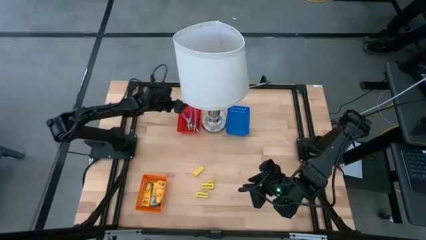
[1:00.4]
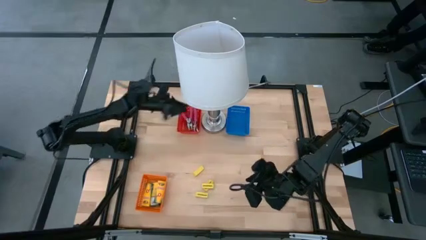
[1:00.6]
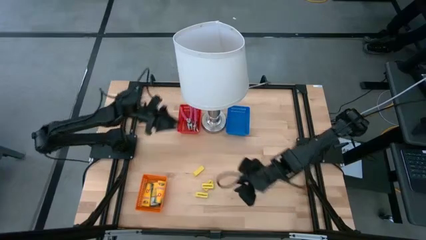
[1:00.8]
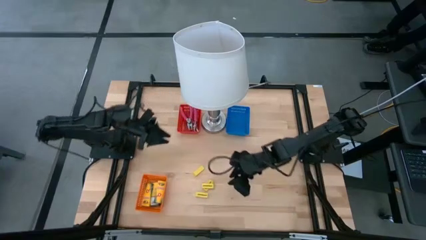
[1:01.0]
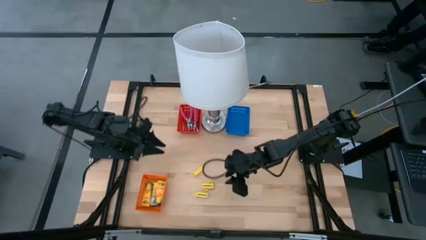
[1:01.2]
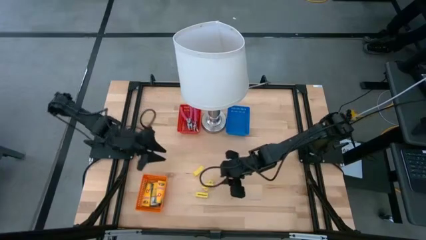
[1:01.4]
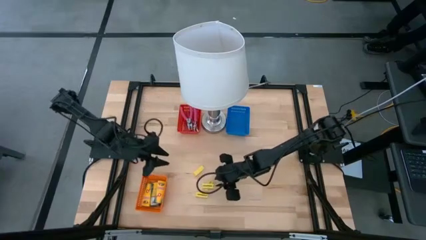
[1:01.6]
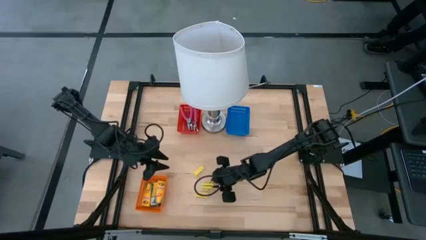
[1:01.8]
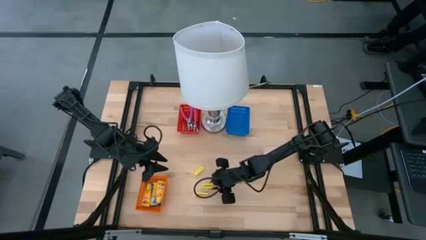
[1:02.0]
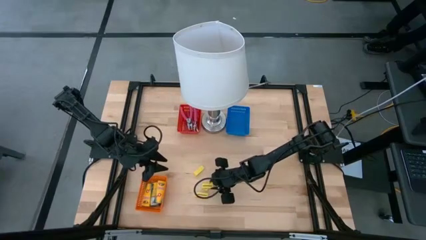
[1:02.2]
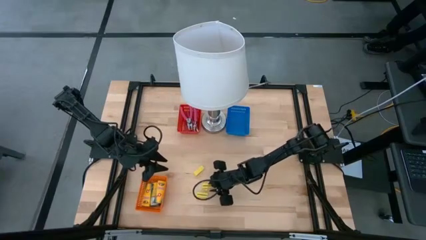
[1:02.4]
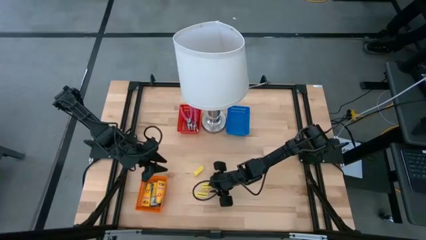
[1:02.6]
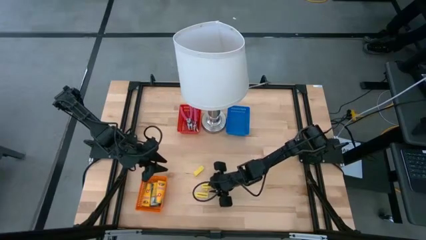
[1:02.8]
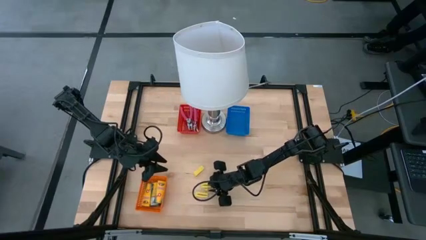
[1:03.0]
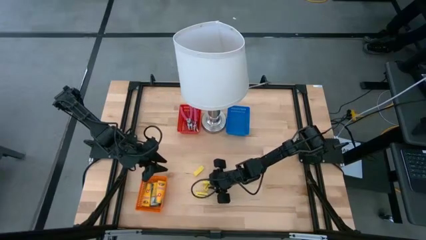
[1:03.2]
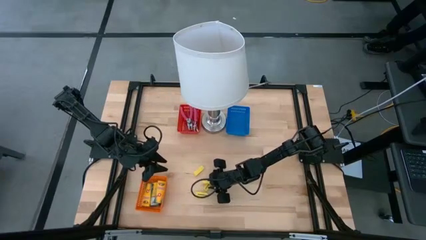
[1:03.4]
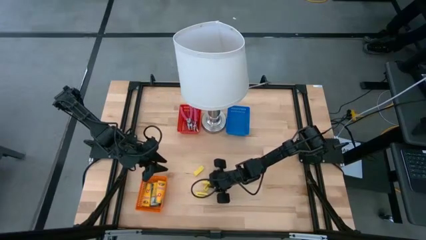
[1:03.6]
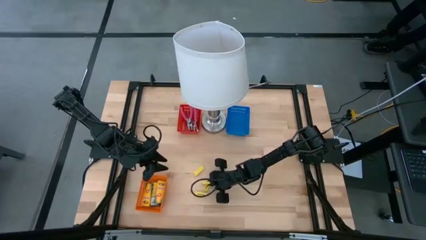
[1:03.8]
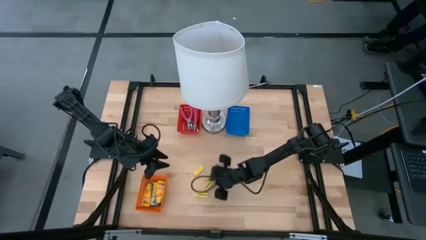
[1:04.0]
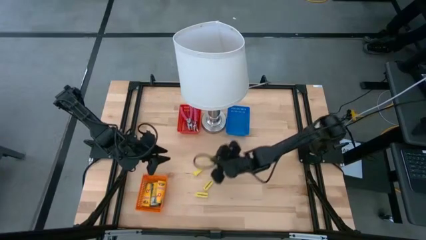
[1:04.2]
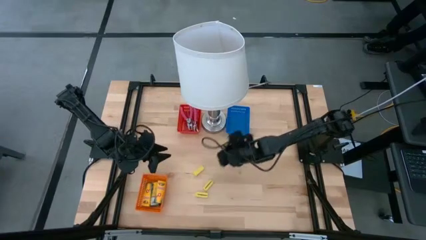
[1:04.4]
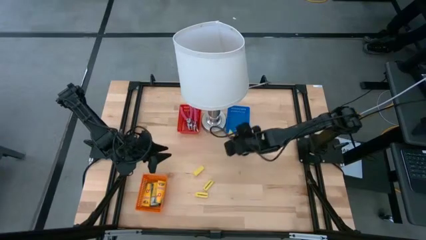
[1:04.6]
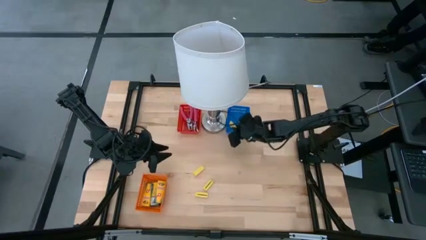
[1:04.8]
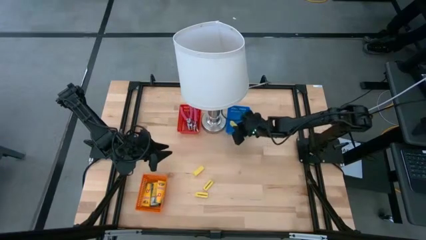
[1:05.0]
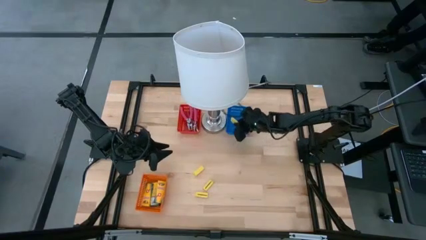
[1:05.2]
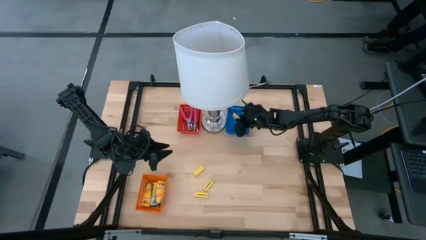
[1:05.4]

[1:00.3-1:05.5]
Task: Pick & Place School Supplies
Put the yellow eraser into the blue basket

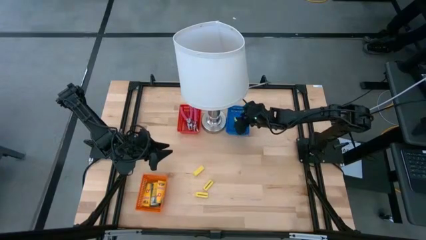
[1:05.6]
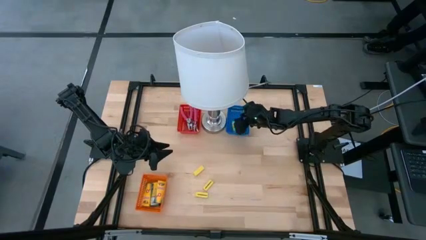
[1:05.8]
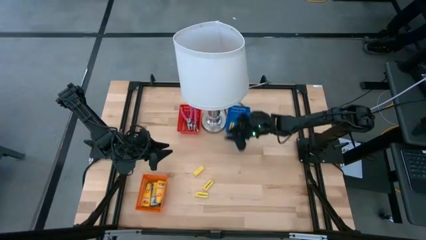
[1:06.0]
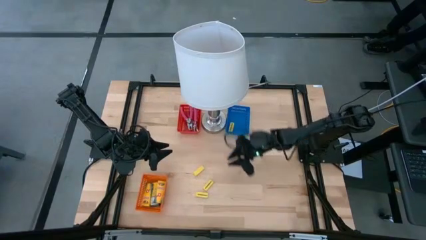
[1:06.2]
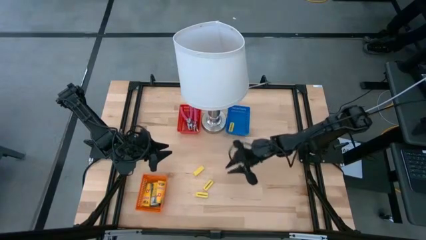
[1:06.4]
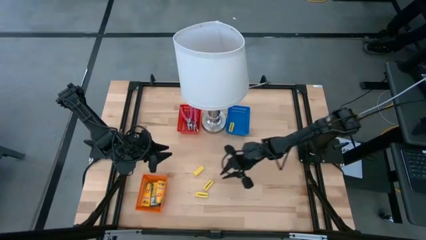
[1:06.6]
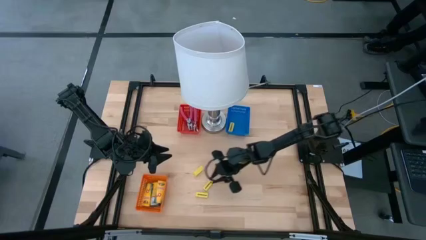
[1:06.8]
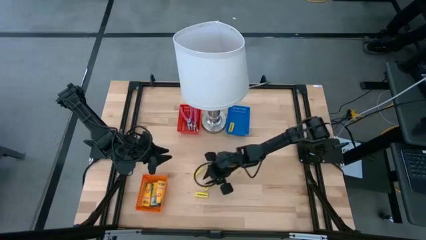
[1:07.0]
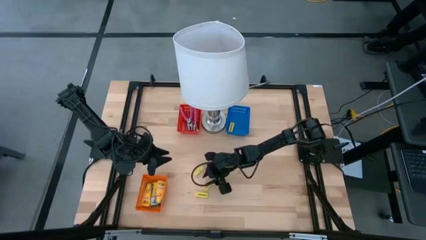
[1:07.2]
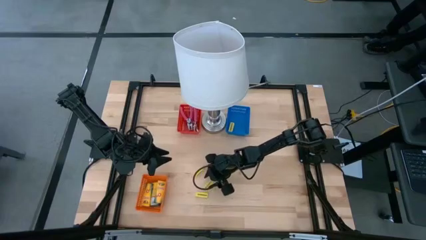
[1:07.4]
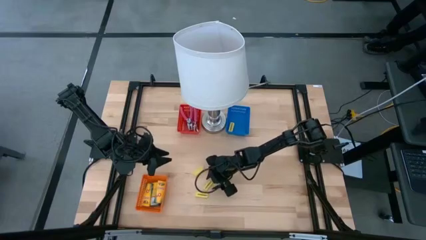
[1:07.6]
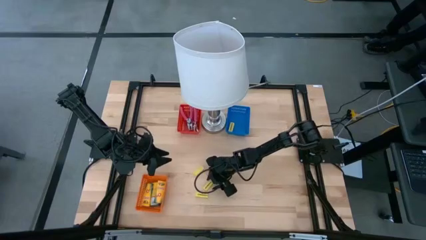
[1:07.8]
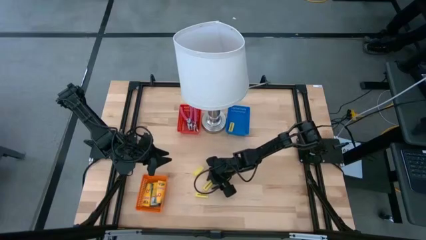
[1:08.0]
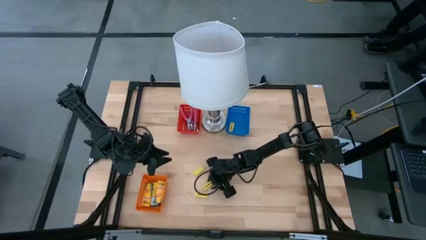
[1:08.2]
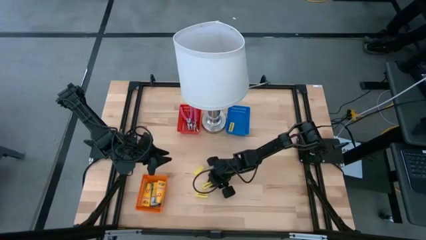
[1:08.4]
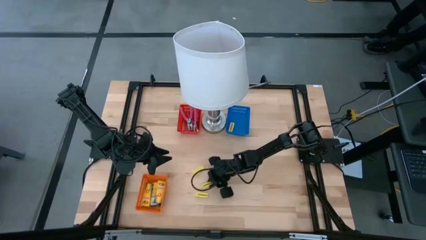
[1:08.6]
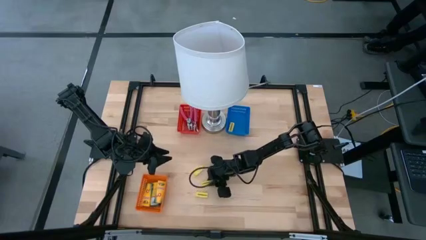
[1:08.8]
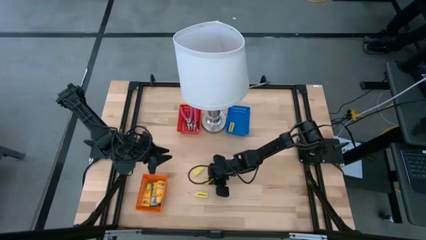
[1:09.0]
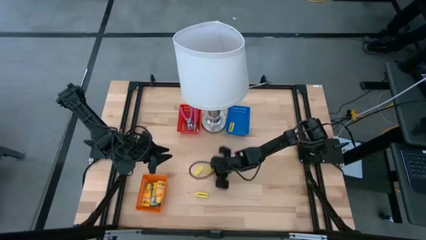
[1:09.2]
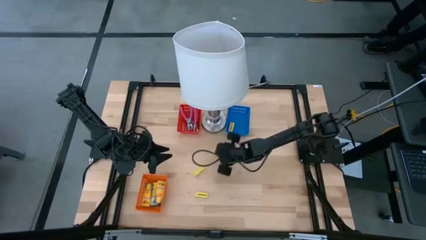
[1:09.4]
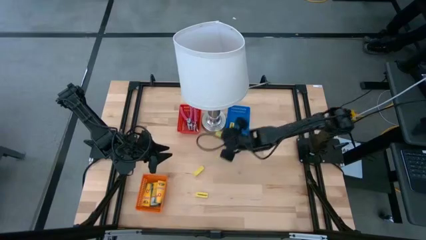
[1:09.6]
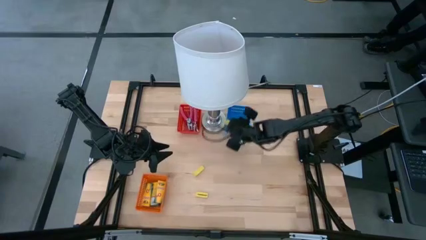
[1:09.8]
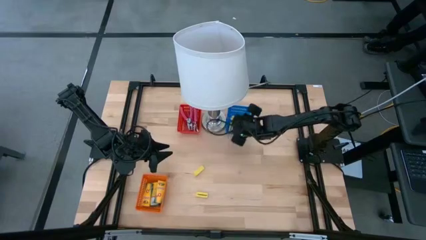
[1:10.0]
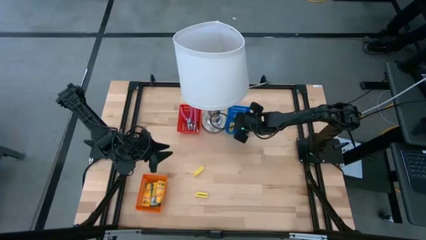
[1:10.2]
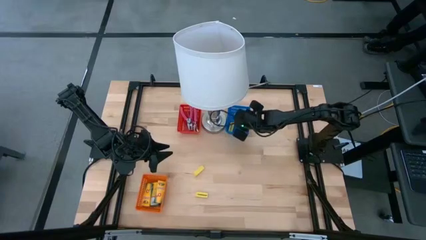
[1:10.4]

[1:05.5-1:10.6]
Put the yellow eraser into the blue basket

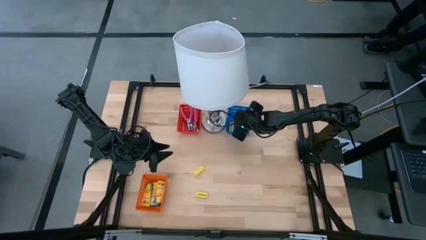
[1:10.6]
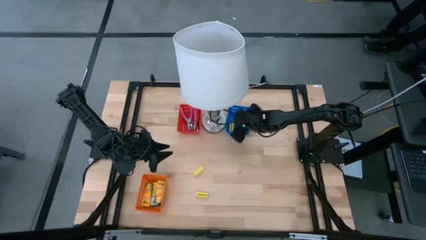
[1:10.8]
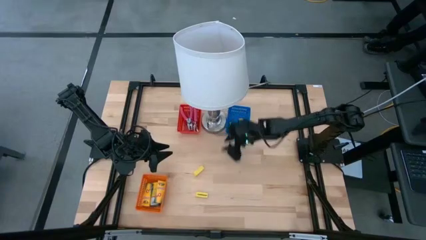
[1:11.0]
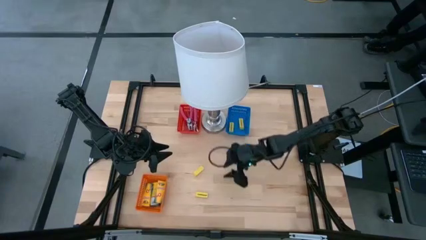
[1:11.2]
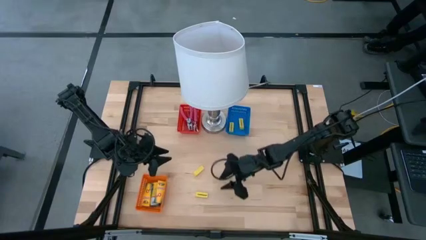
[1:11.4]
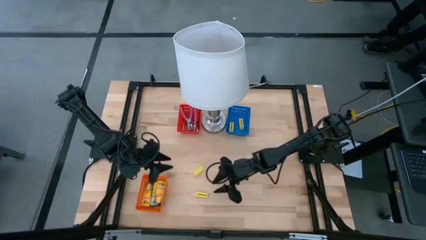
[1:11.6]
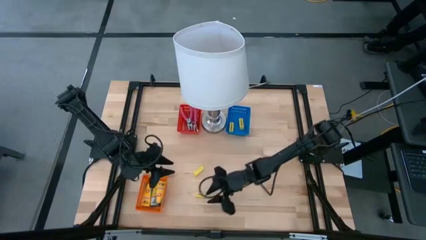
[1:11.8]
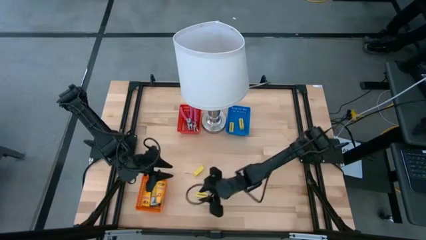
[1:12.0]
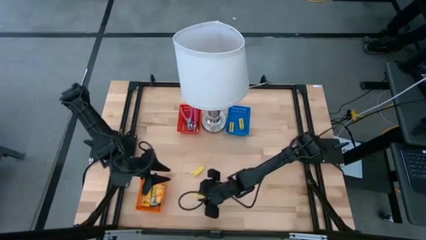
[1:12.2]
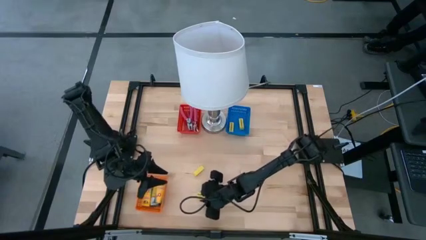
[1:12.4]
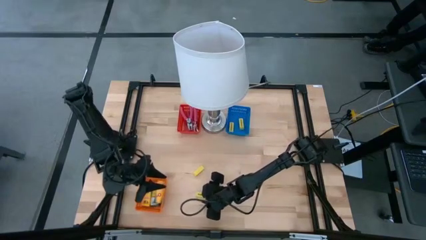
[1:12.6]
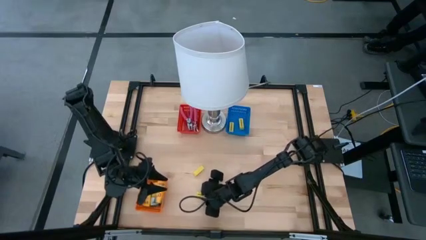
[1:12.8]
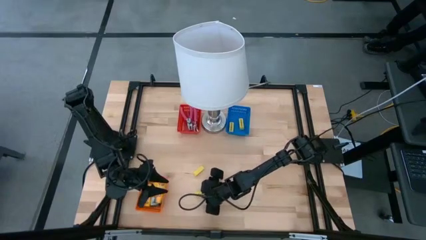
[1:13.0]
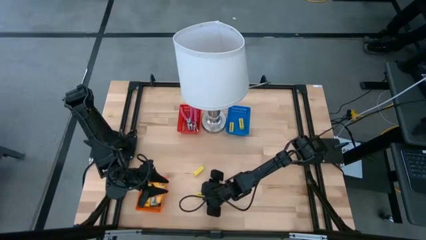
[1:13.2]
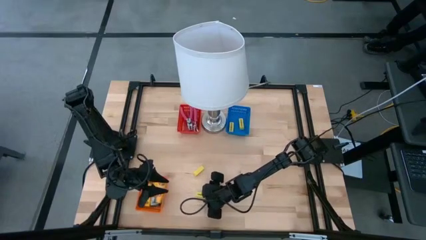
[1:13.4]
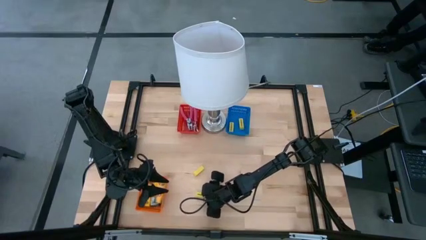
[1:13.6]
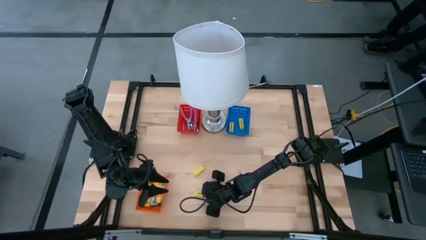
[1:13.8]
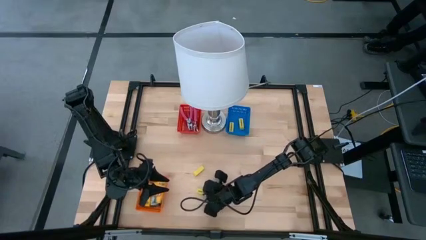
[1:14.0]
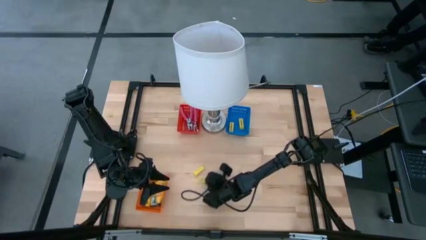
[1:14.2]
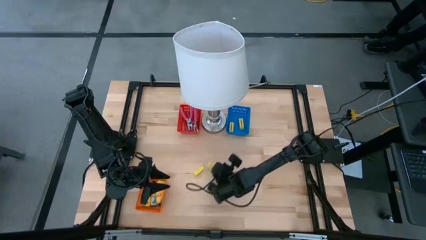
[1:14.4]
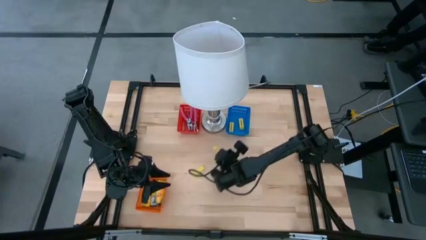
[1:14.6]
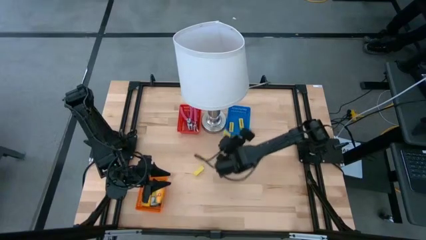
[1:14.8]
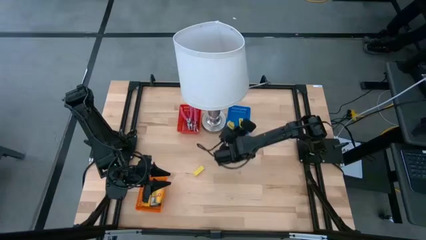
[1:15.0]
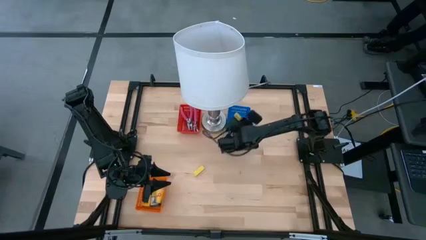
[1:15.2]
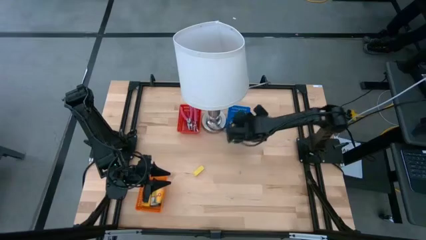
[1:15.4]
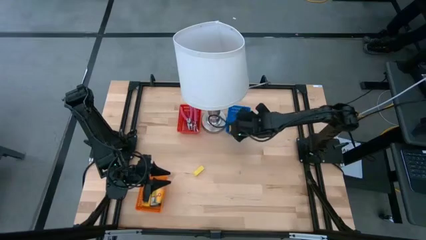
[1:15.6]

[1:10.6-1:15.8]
Put the yellow eraser into the blue basket
